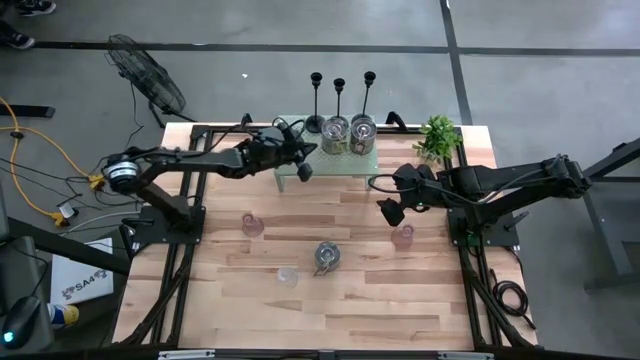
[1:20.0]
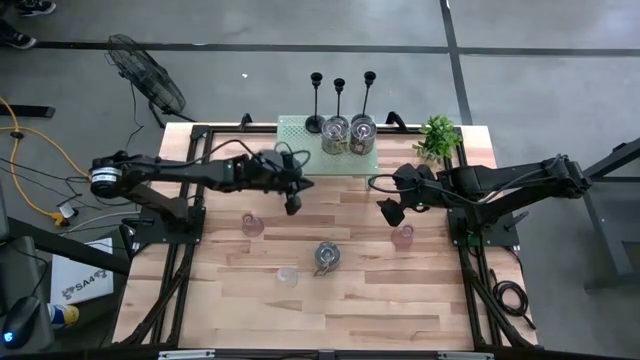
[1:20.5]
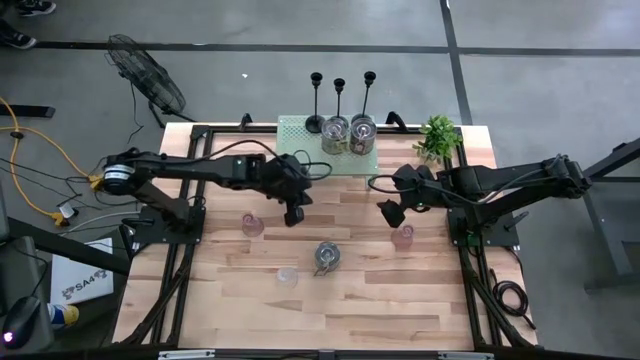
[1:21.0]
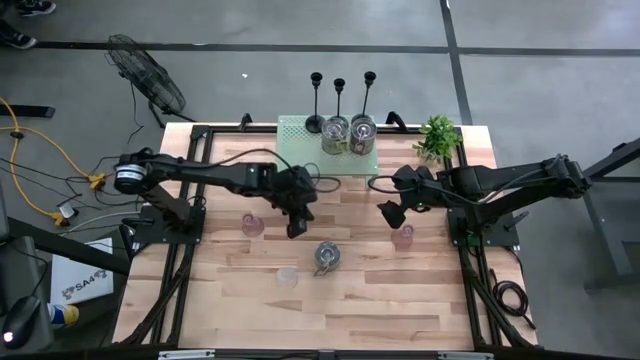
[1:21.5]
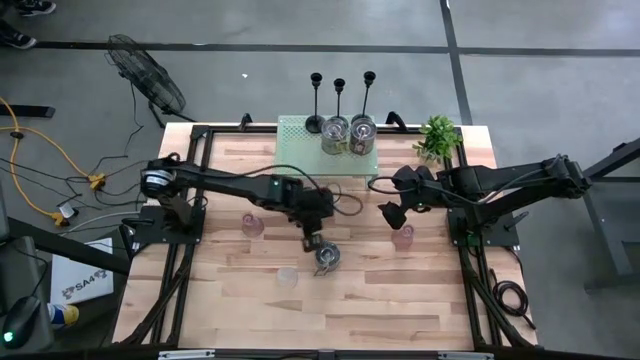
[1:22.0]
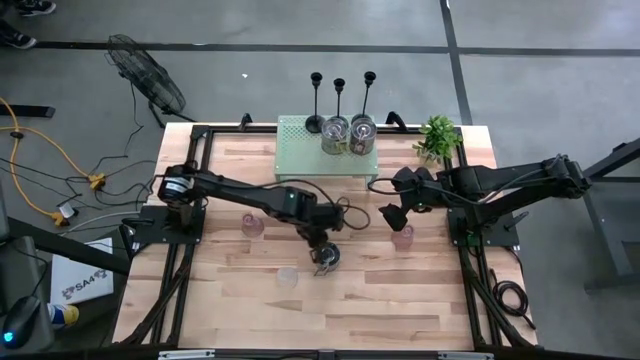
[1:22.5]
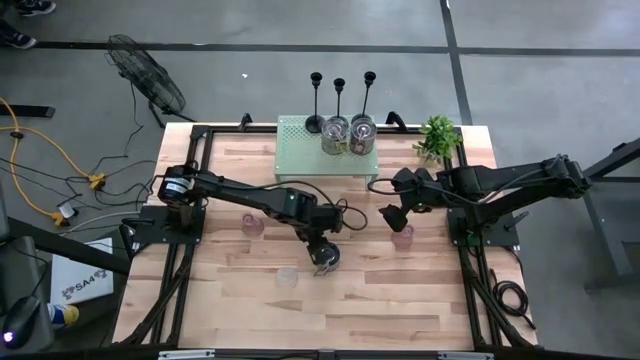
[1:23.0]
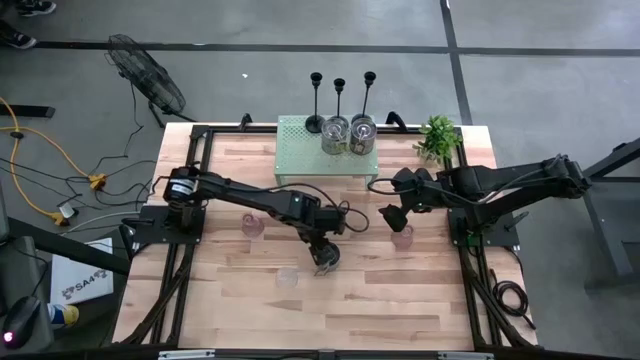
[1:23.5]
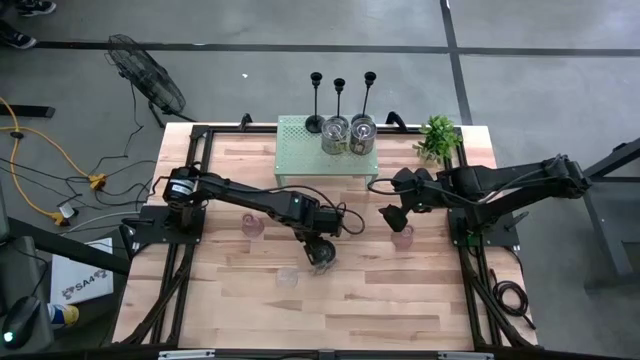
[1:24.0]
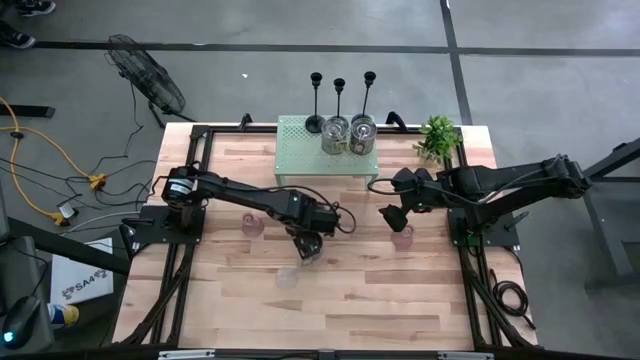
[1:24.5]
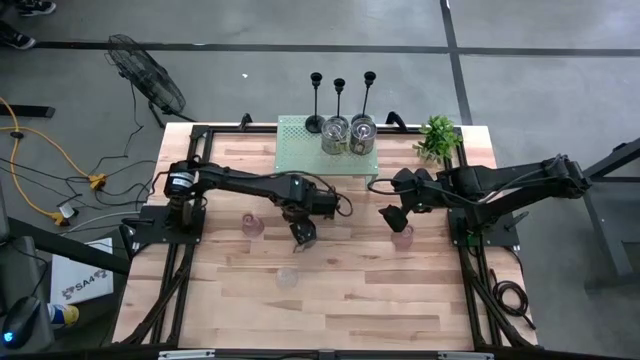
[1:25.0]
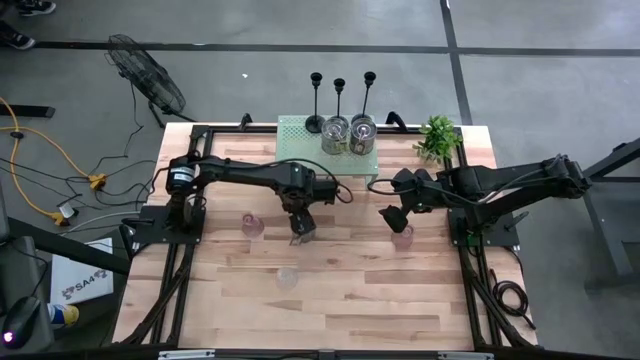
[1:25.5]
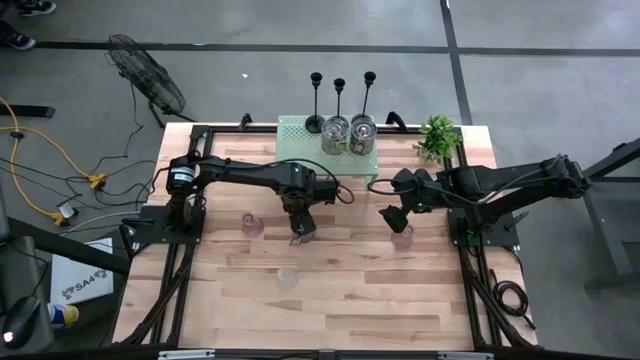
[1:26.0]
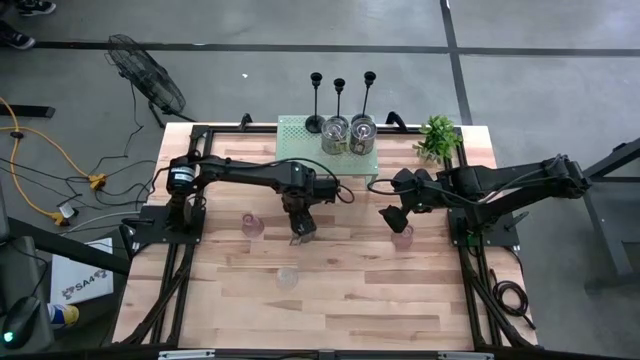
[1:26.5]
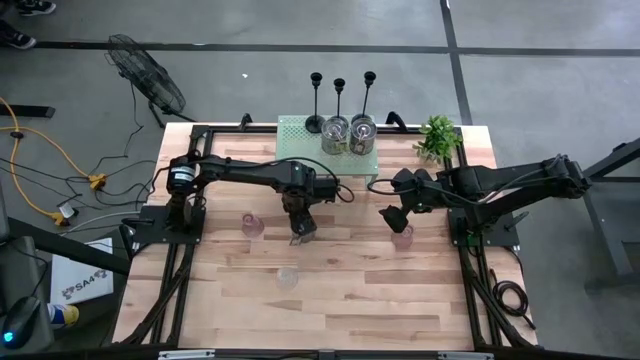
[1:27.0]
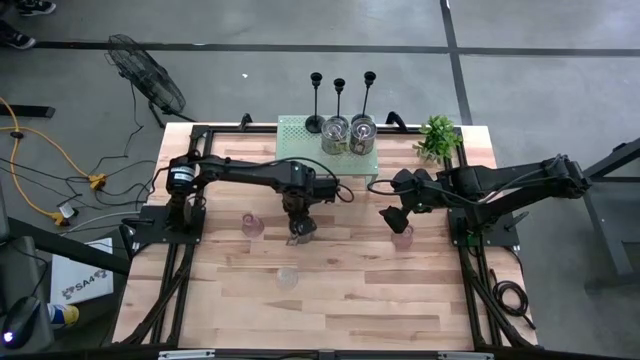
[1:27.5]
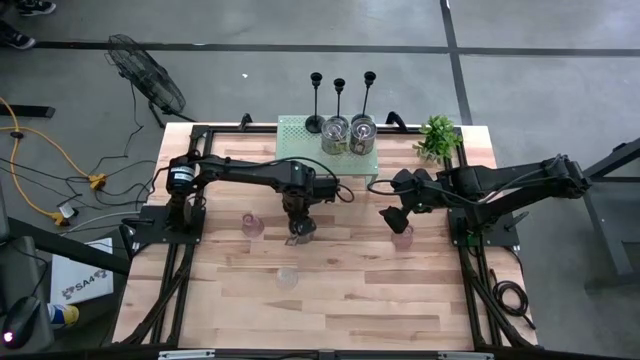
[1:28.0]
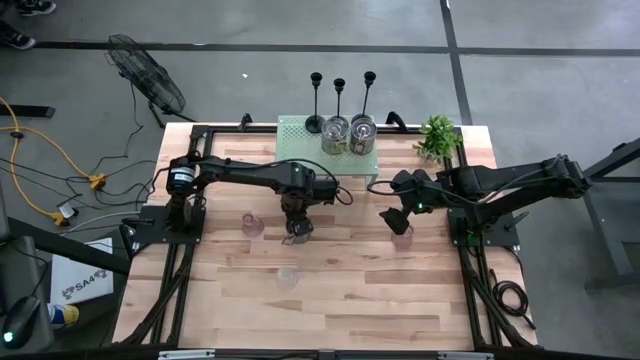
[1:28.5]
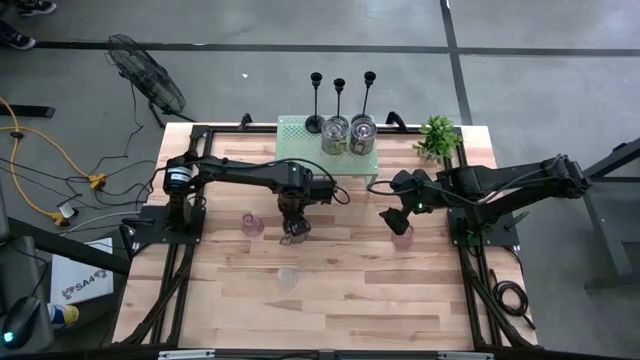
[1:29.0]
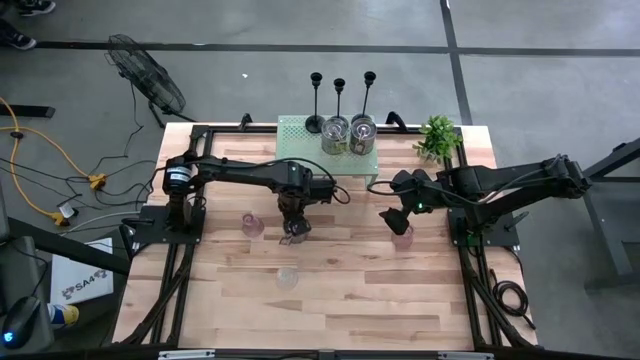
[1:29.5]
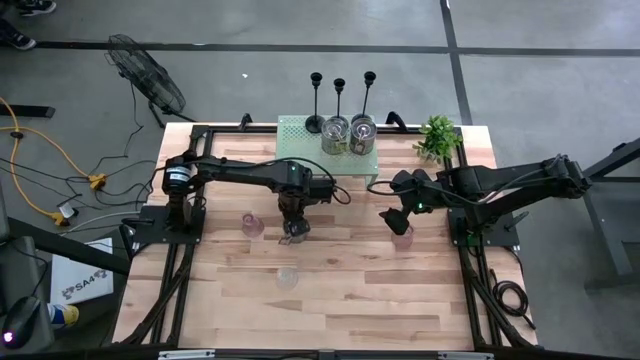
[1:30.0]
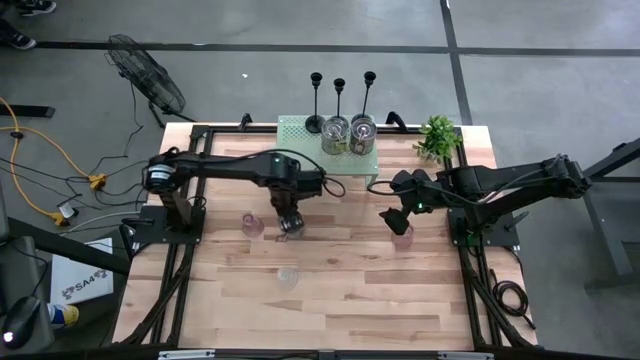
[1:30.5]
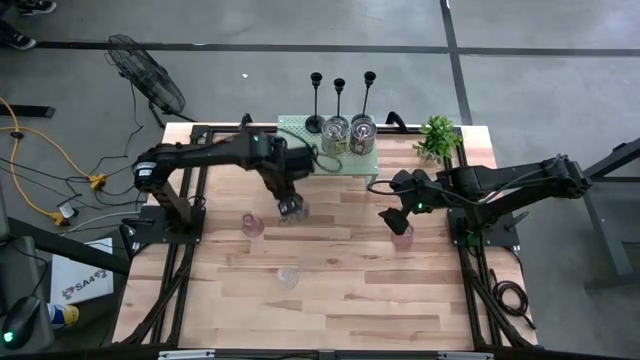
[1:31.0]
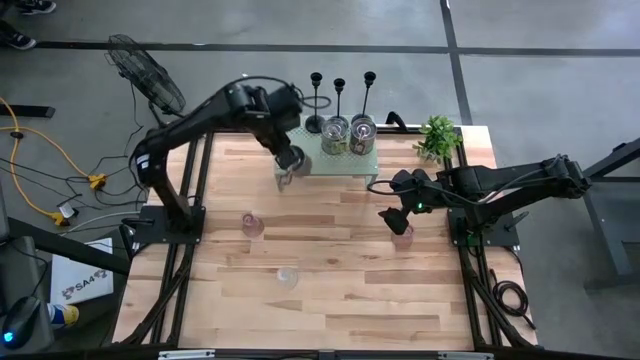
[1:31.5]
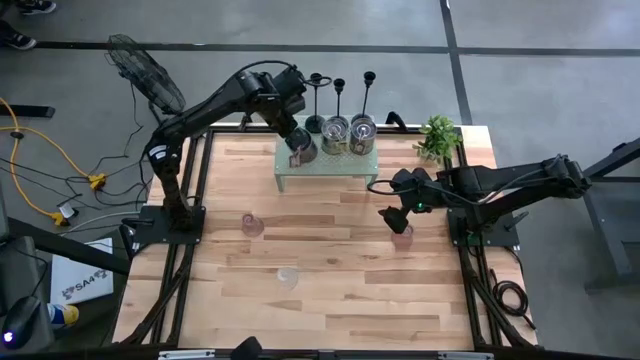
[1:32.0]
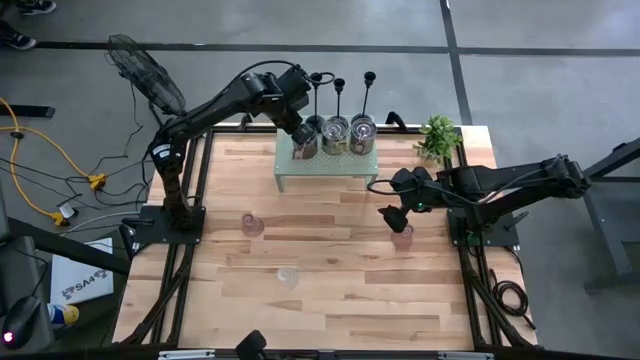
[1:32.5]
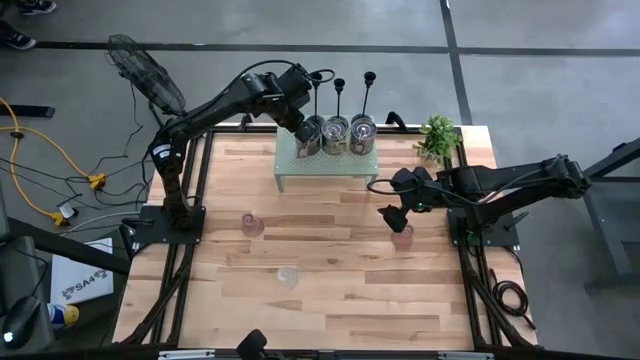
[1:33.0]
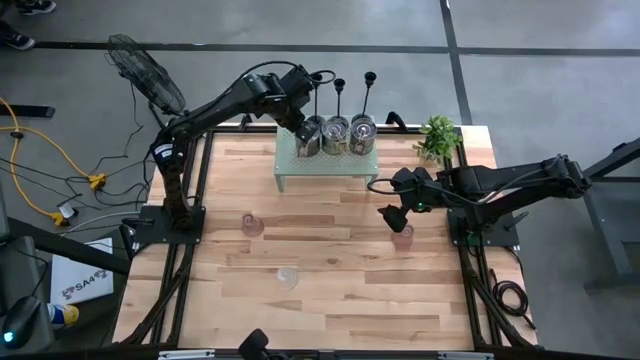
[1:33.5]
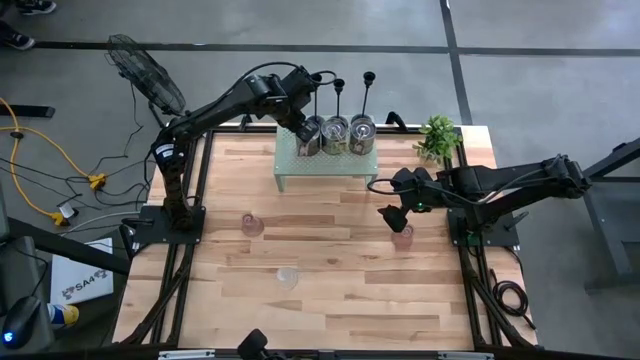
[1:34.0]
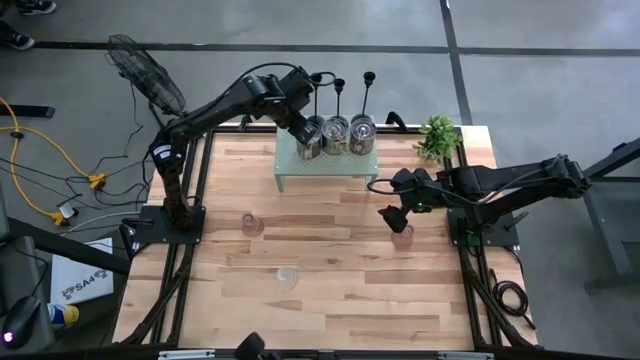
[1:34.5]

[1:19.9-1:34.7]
Task: Pick & Place candle stick holders
Put the silver scented candle on the shelf aligned with the silver scented candles

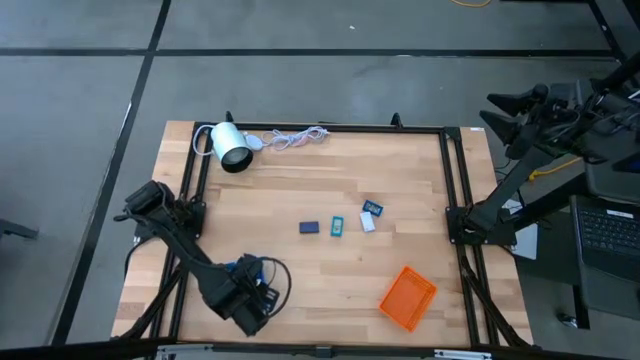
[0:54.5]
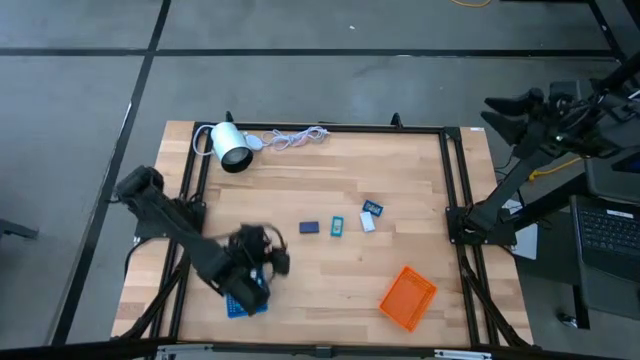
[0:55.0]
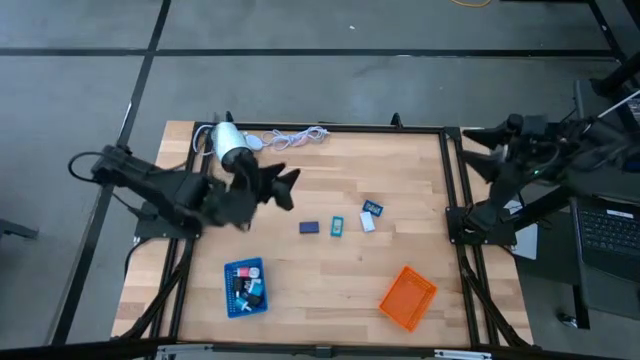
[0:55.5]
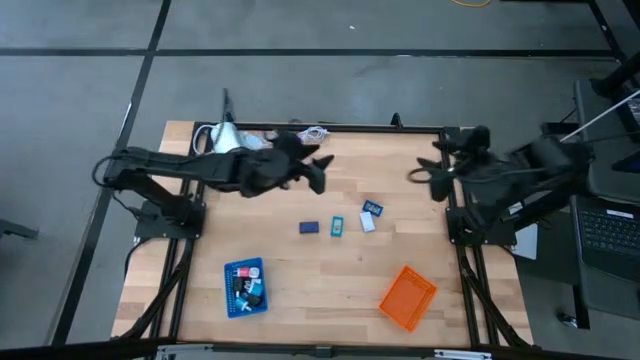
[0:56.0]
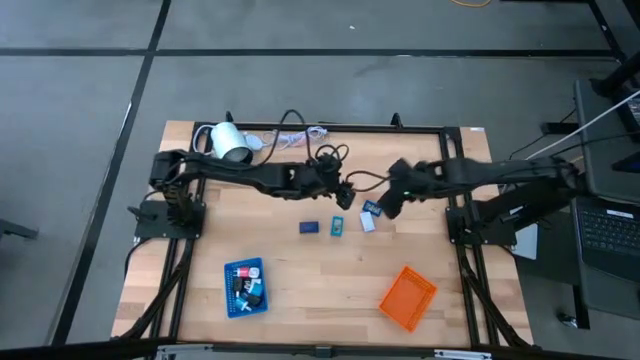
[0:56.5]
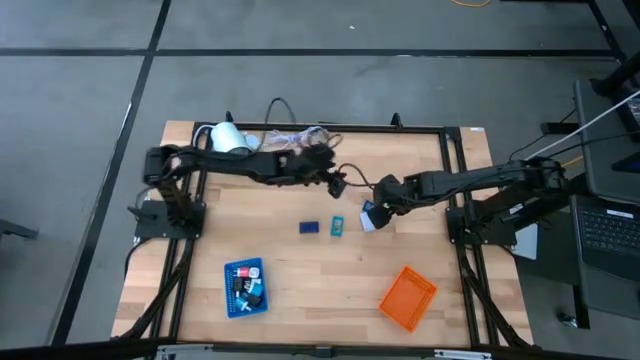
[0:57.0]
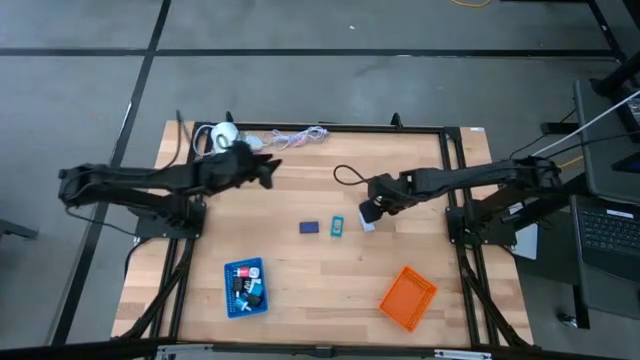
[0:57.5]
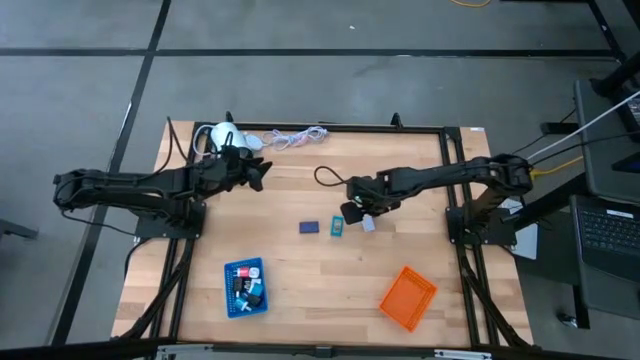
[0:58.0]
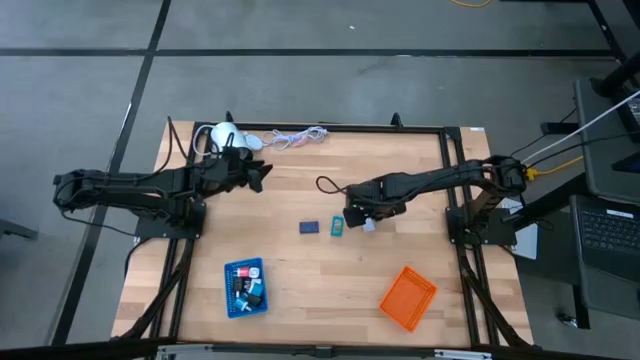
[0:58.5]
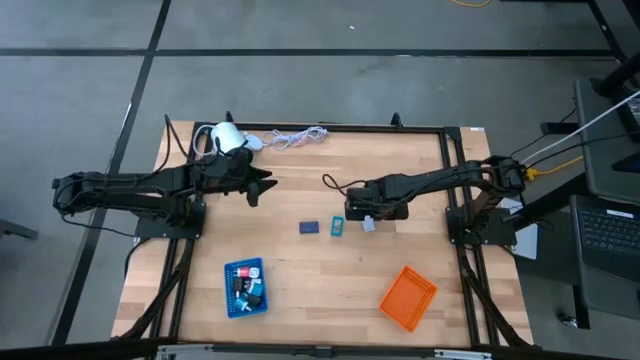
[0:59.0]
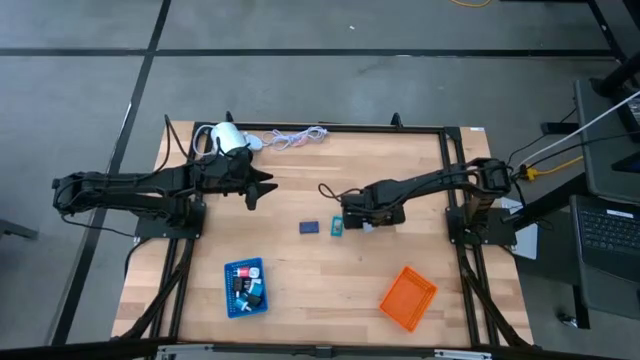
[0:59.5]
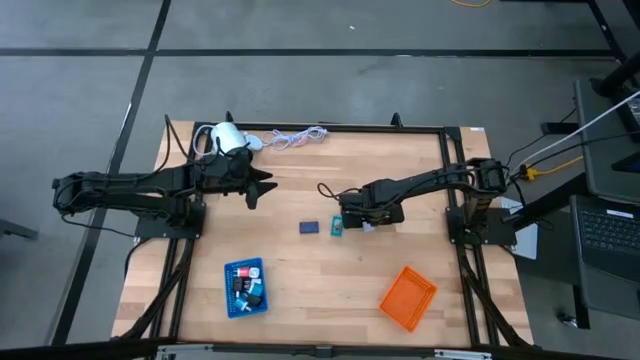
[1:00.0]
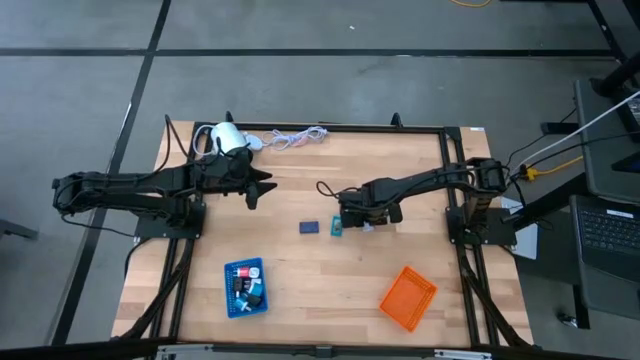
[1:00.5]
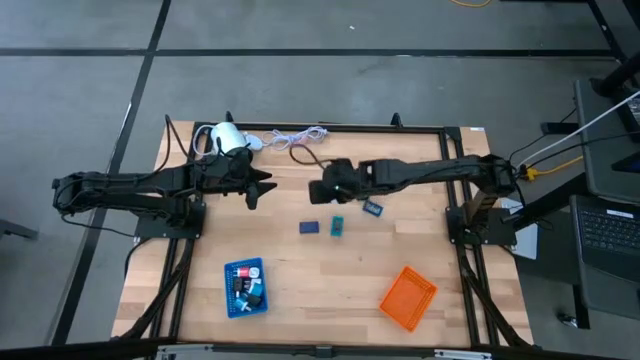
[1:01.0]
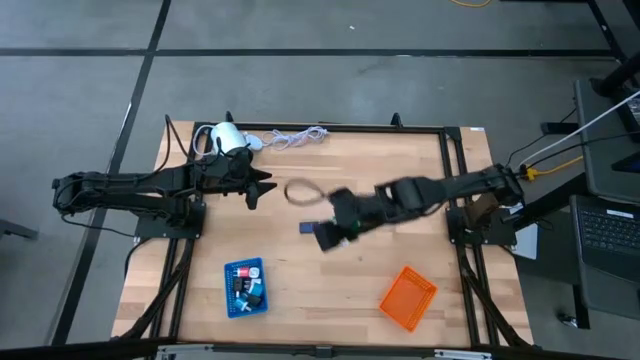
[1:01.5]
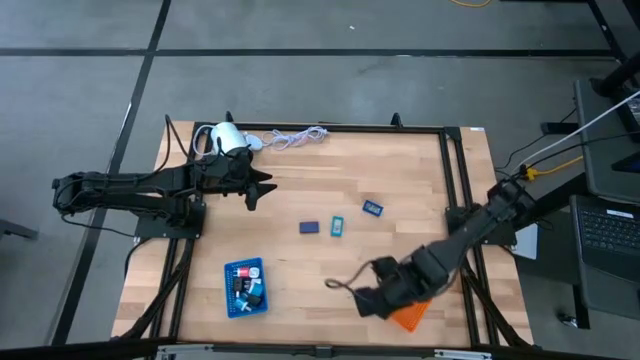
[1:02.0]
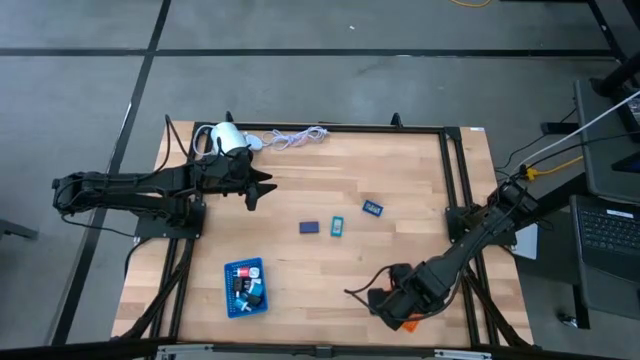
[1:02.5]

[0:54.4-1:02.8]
Task: Pick & Place Office items
Put the white digital clock into the orange basket
